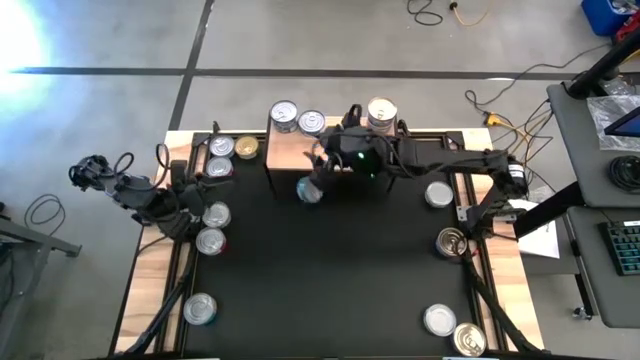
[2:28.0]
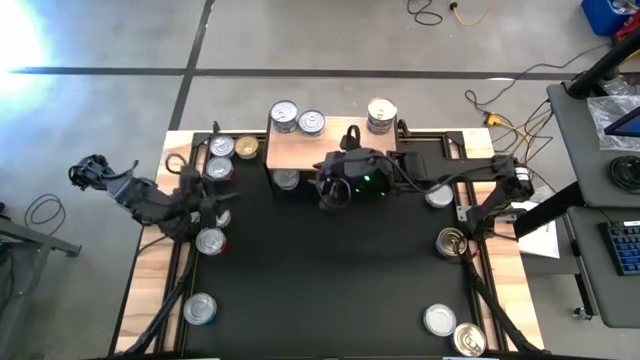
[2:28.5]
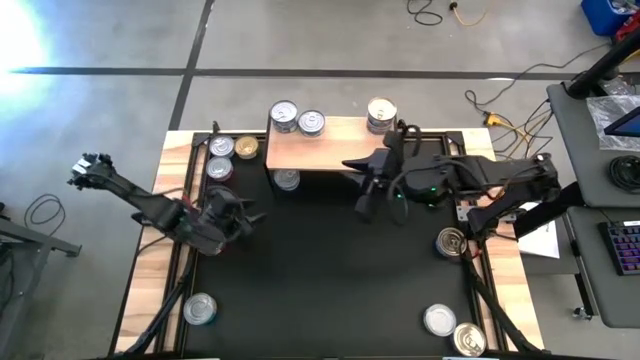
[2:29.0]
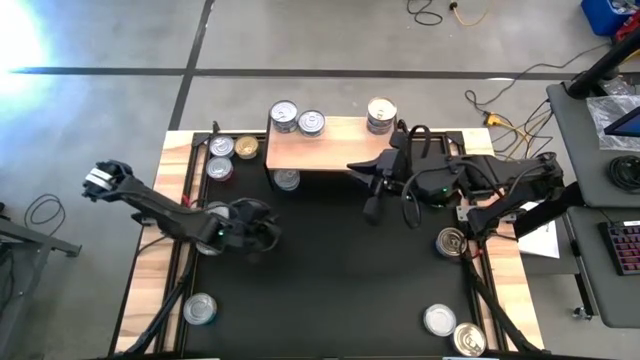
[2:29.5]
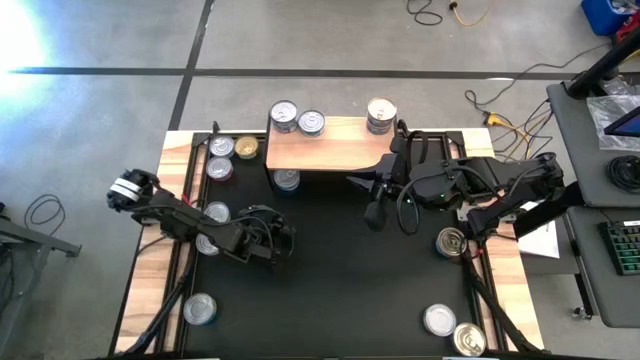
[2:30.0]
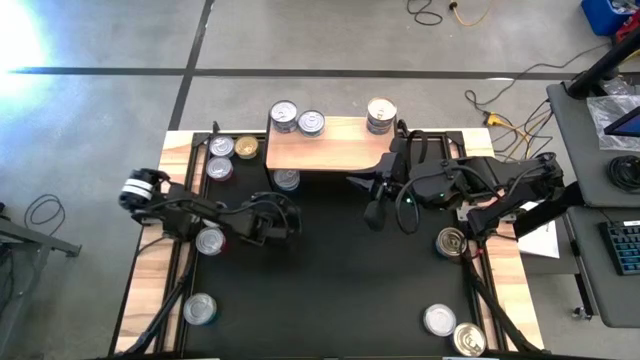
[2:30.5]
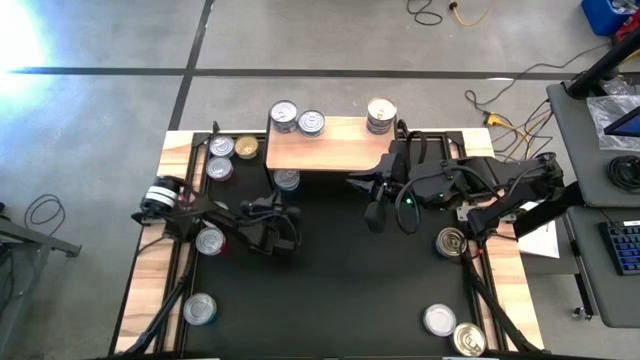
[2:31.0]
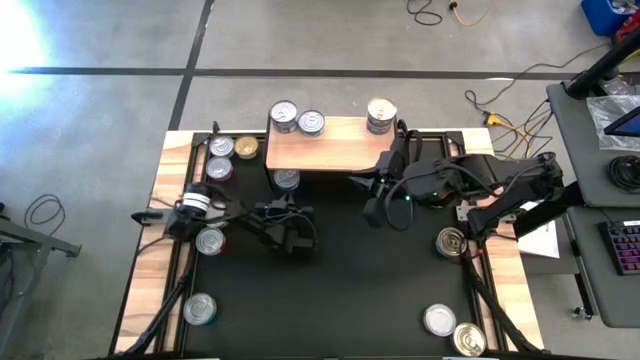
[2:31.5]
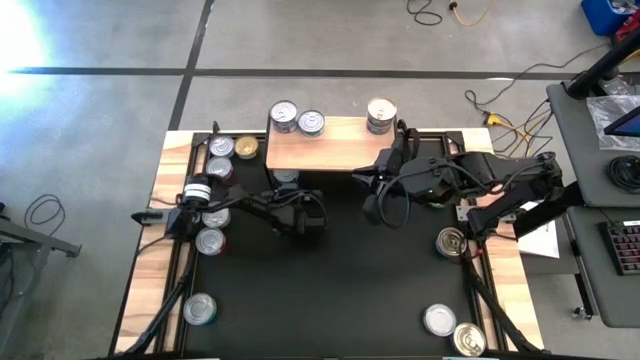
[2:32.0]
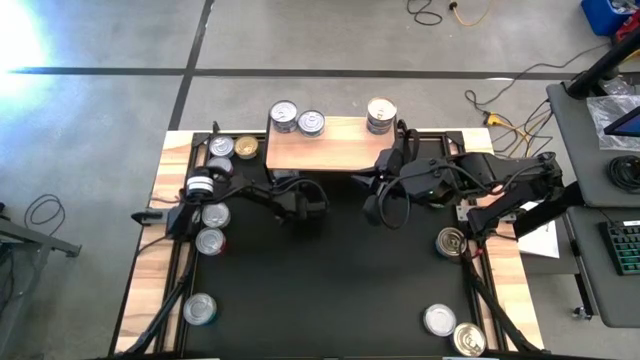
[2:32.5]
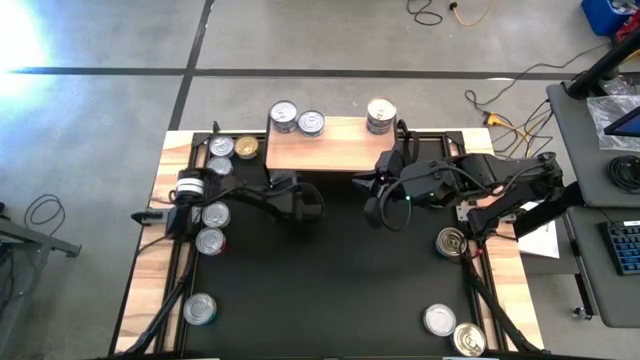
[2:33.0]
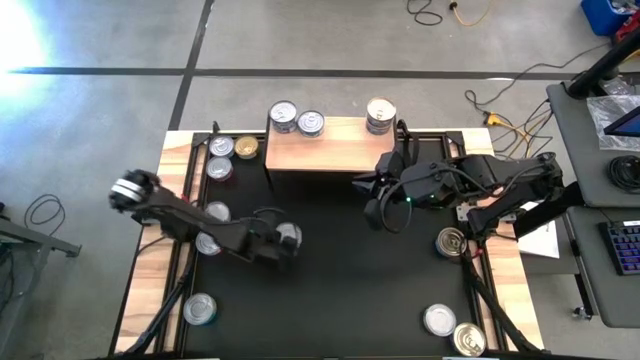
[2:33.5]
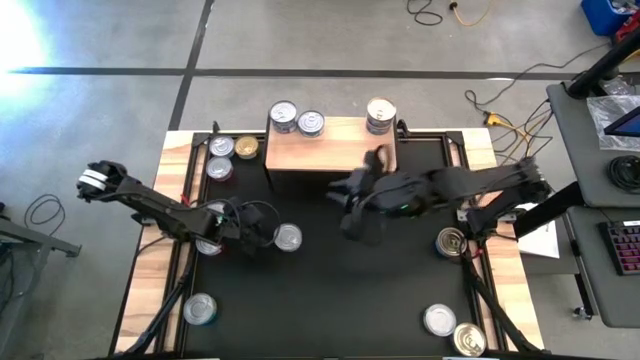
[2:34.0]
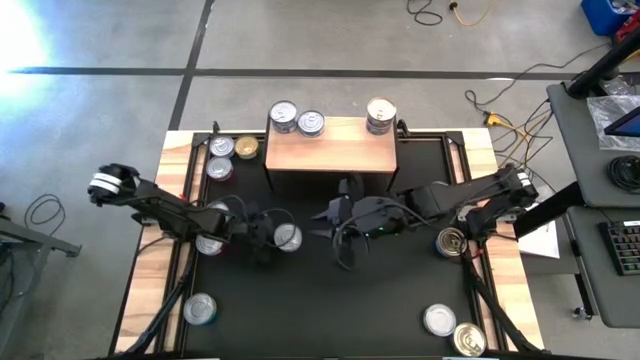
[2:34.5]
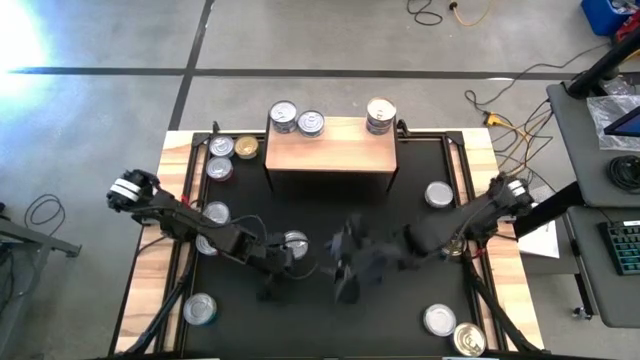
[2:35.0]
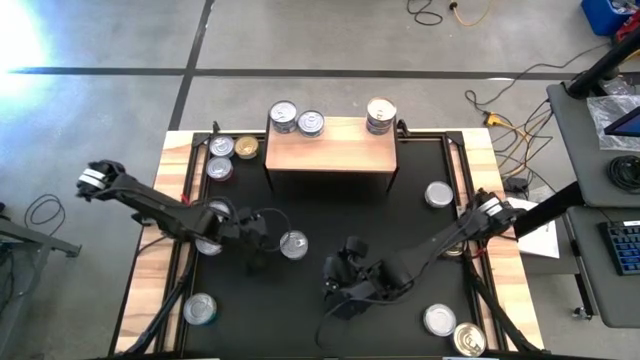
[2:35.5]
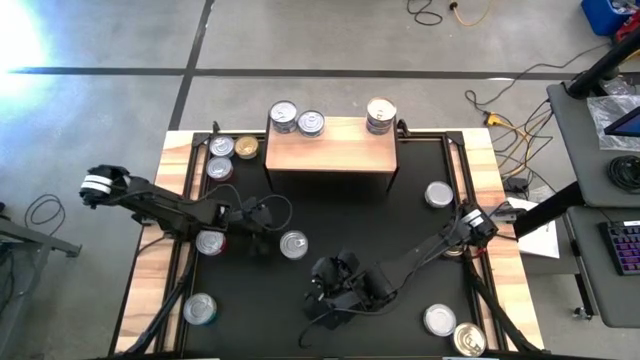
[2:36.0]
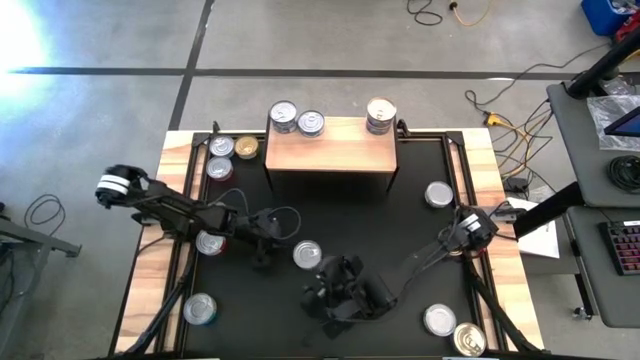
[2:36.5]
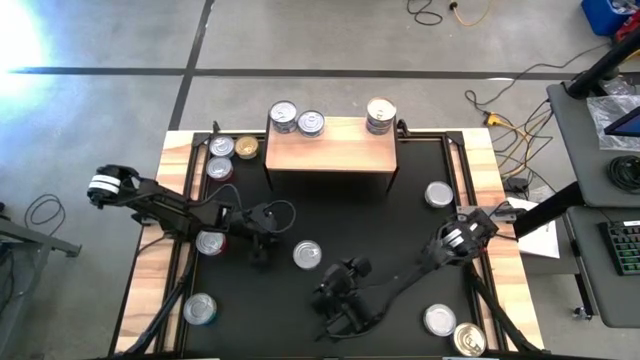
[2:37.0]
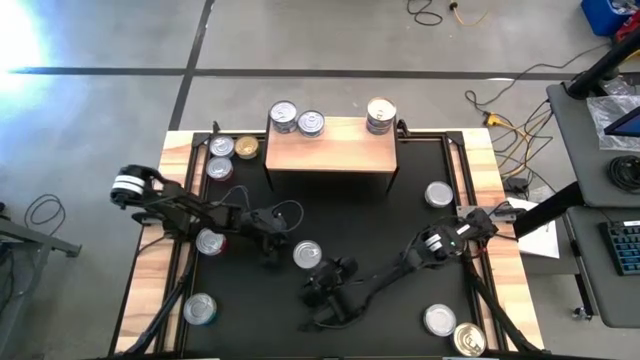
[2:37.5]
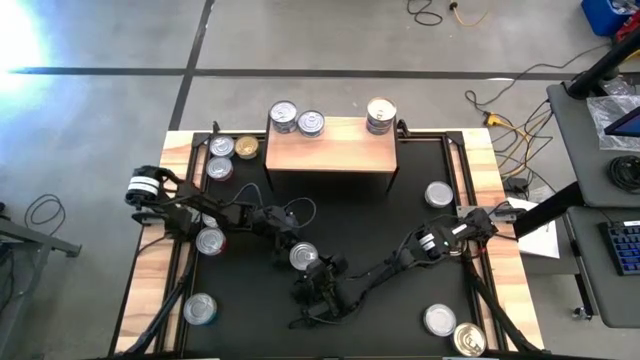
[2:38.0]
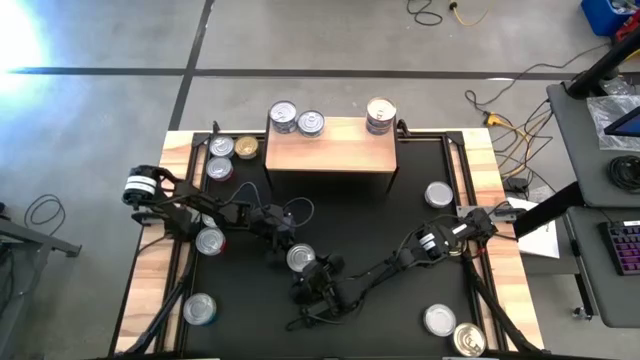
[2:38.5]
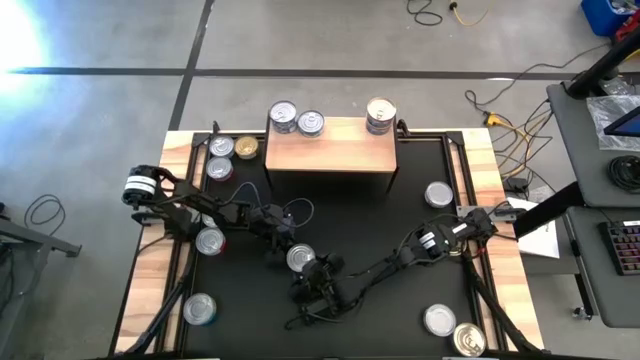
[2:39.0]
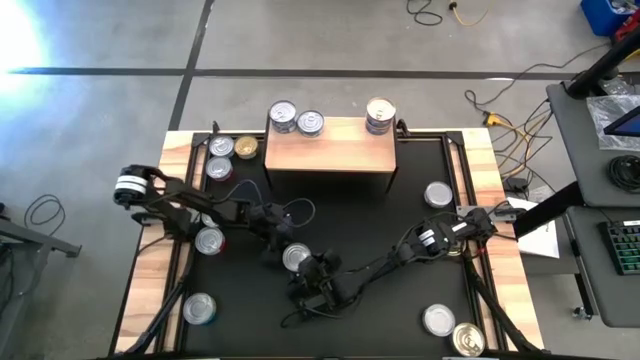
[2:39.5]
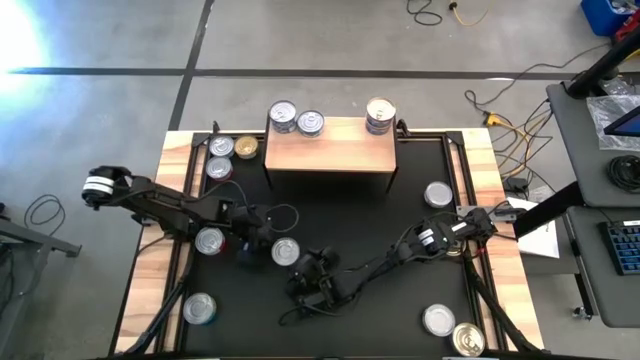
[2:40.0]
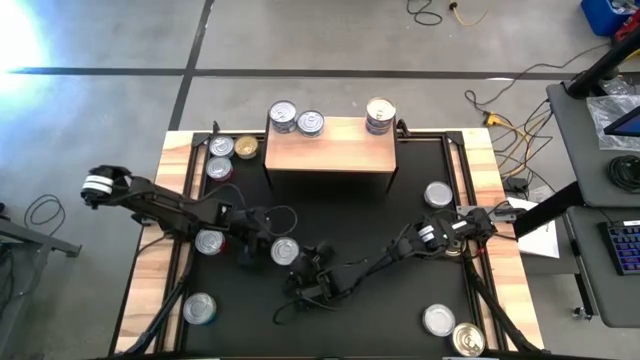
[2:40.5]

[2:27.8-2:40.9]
Task: Stack canned seafood by type on shelf
Stack the green-blue tuna can on the shelf

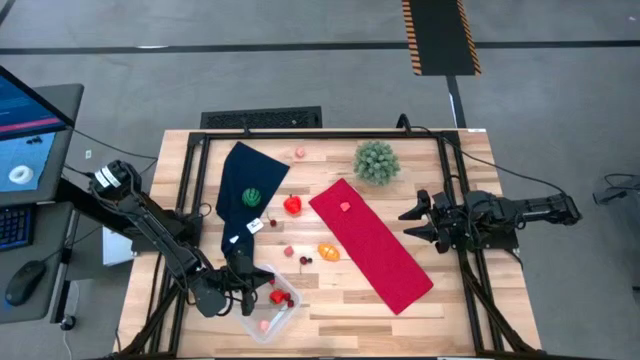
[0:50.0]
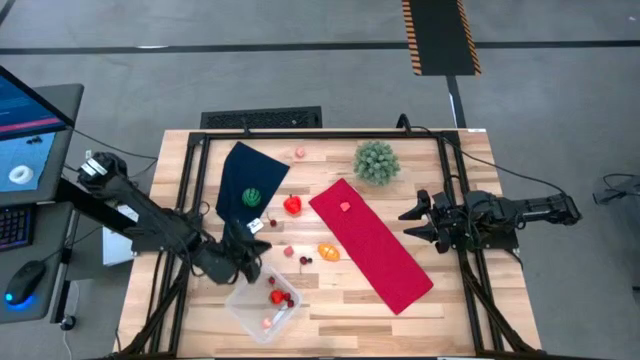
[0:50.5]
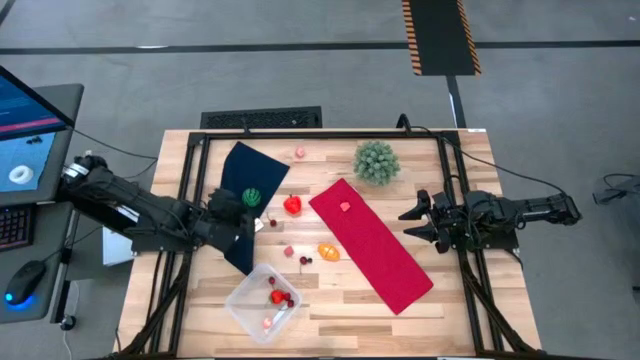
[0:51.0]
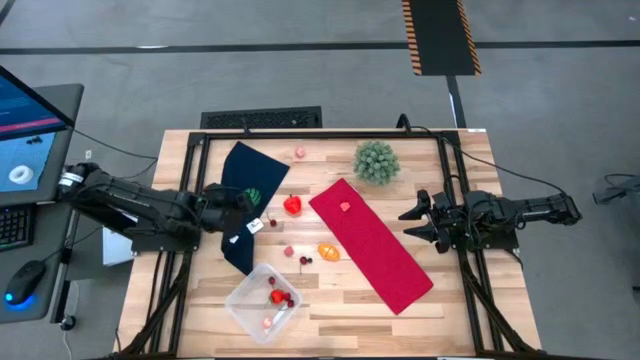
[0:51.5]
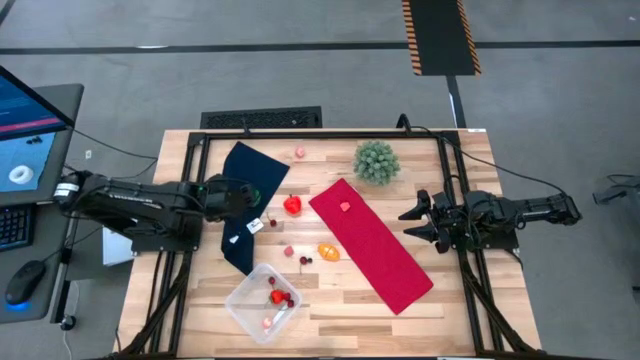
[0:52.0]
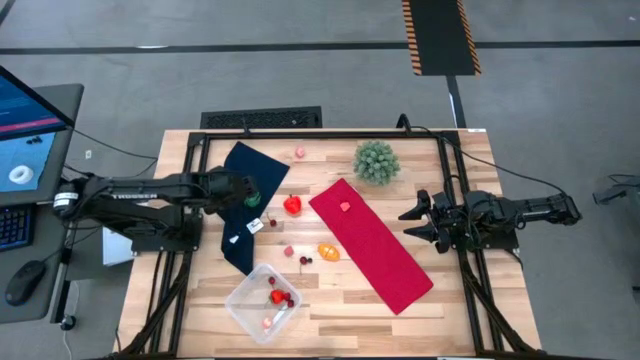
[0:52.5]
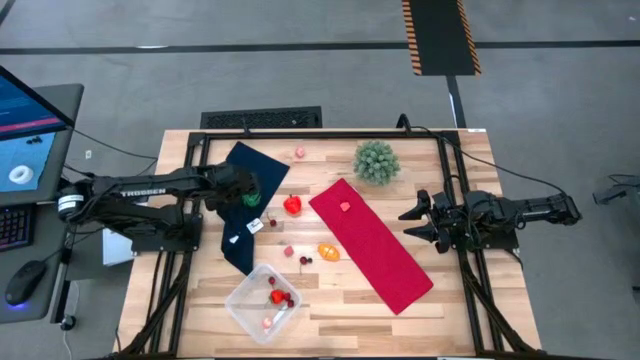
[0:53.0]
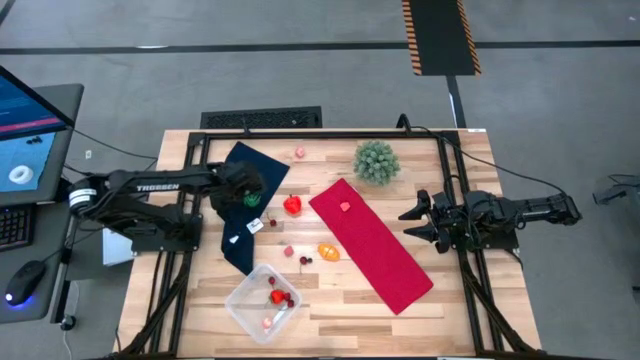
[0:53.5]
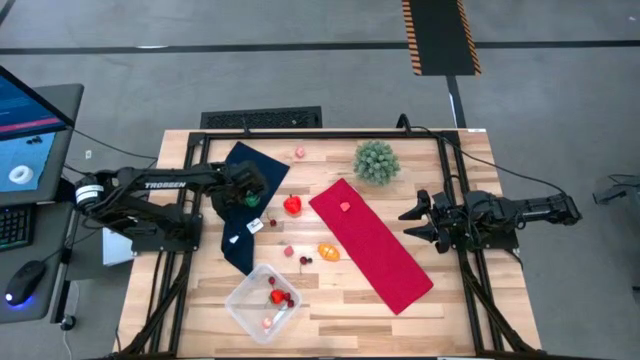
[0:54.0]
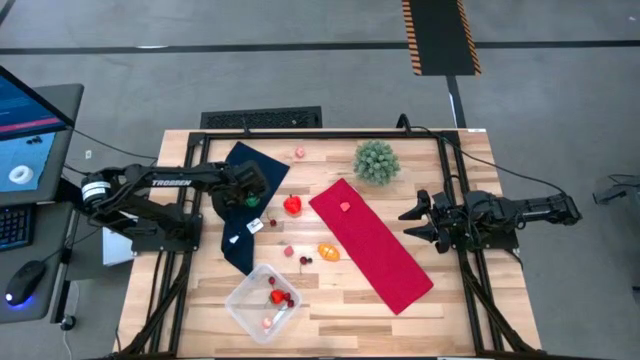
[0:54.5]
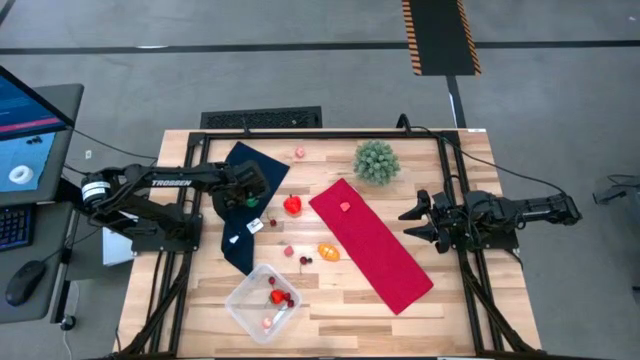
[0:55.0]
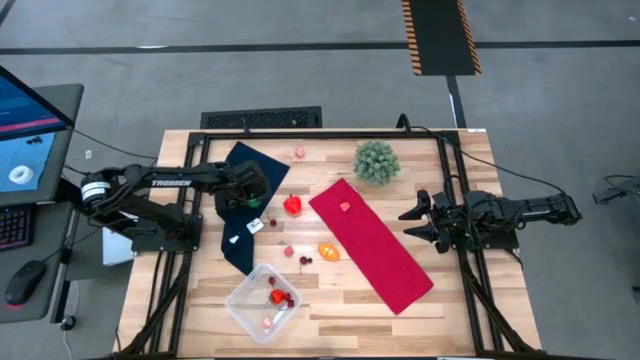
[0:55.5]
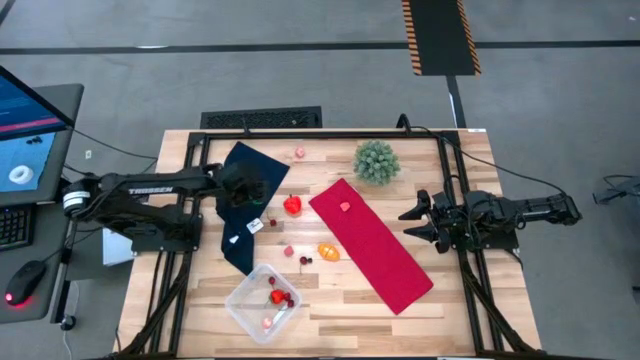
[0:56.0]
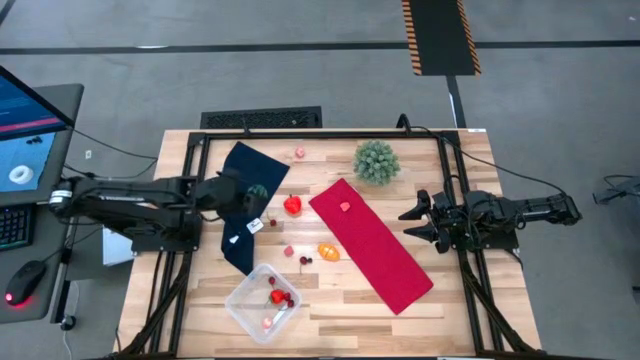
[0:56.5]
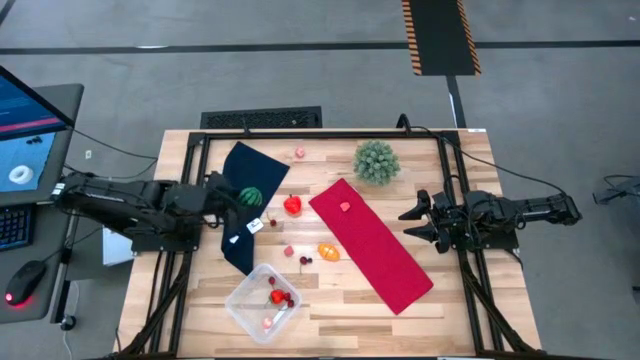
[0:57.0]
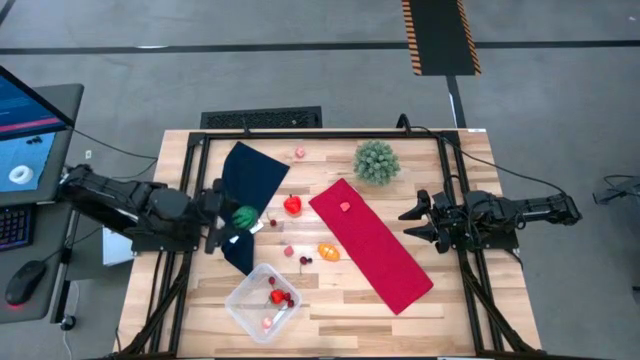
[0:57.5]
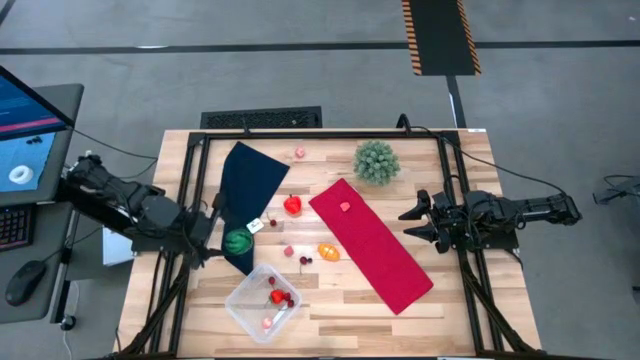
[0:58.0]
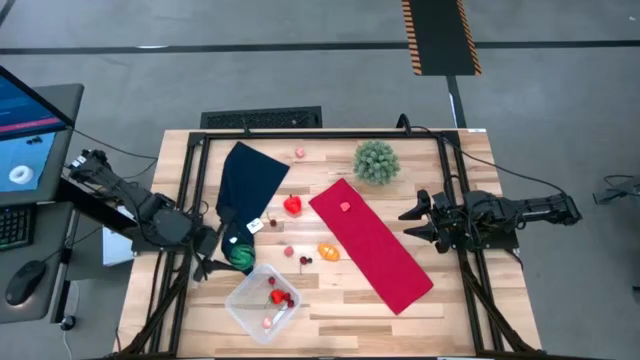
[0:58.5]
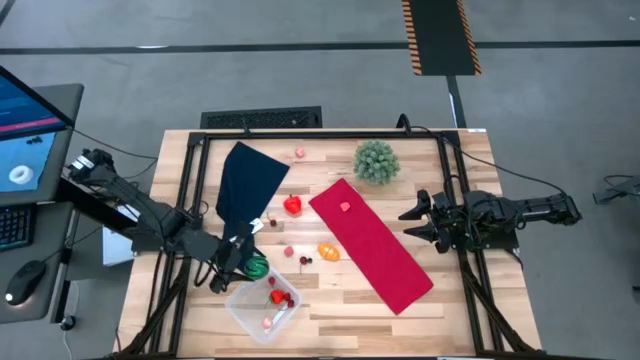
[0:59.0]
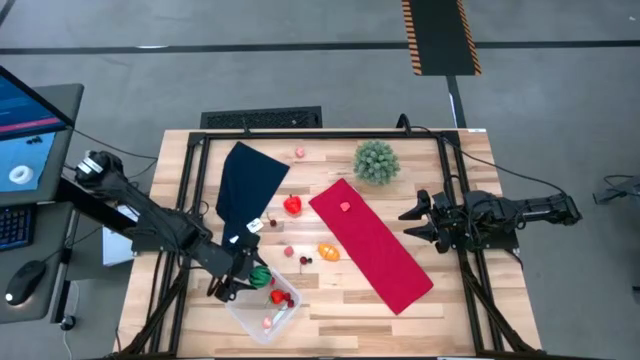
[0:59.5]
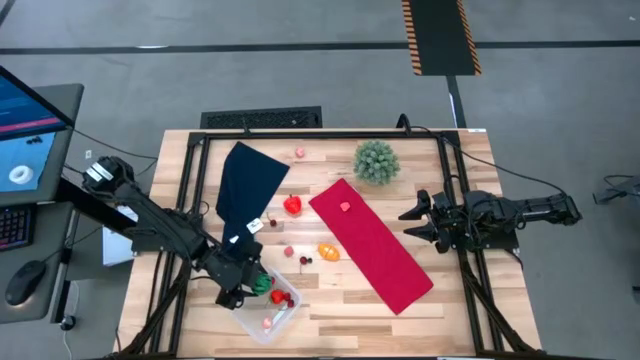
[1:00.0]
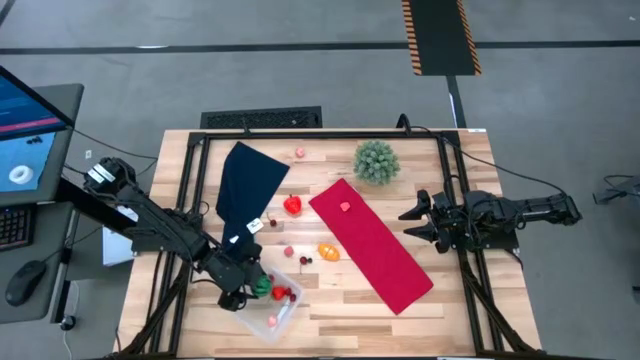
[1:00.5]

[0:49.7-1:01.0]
Task: Pick and placing Produce into tupperware
Put the watermelon into the transparent bin
